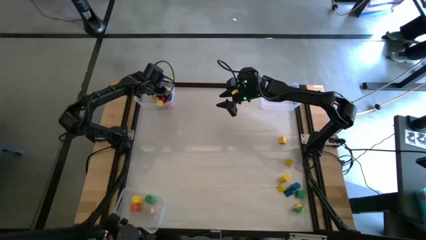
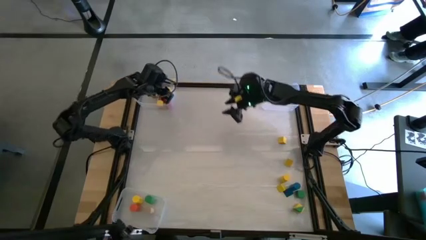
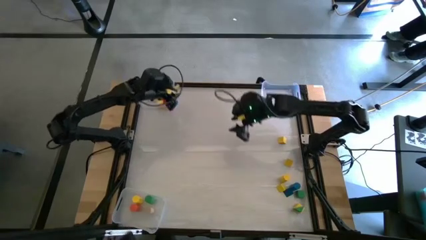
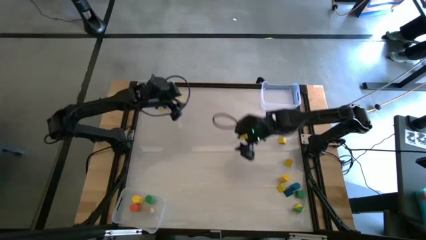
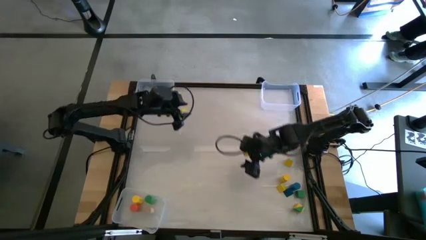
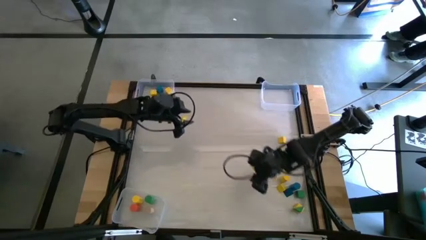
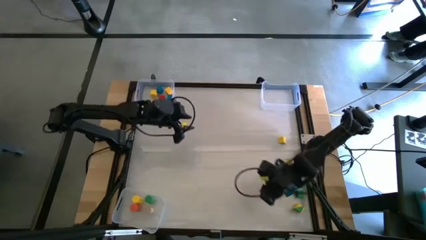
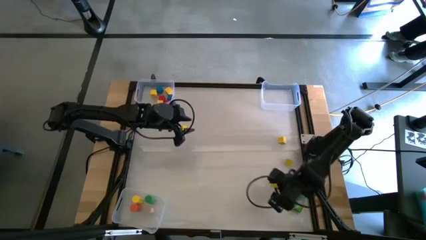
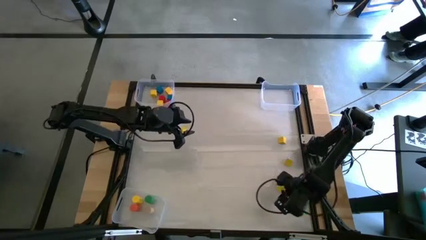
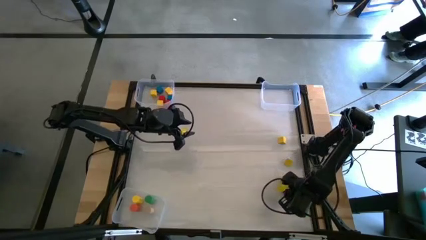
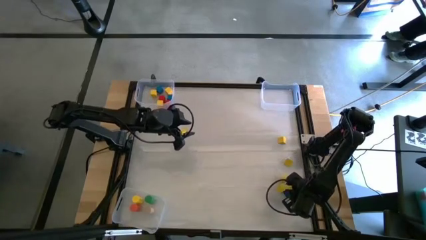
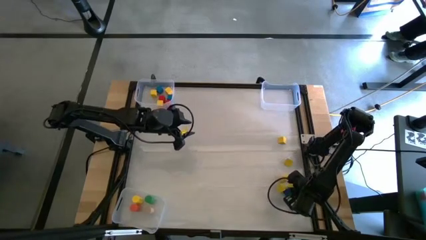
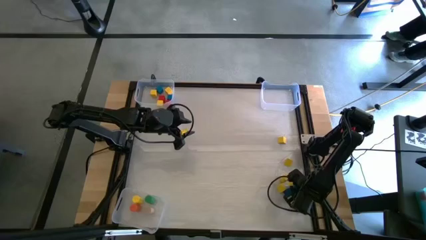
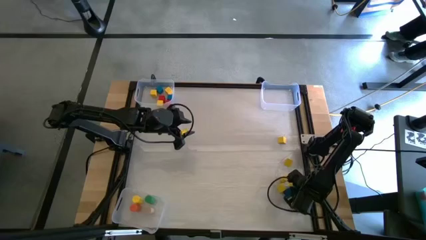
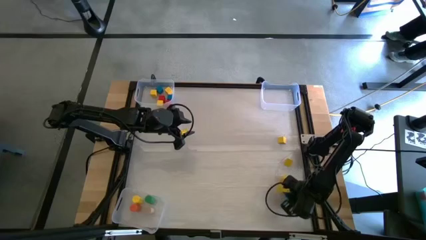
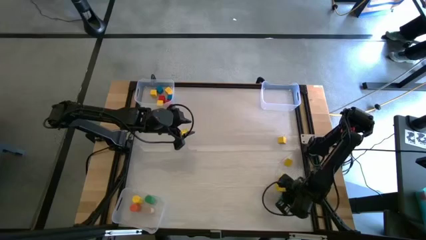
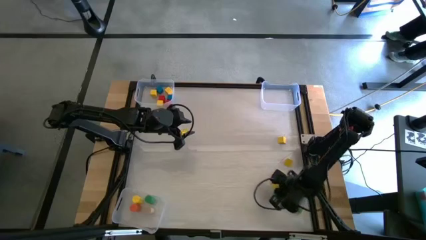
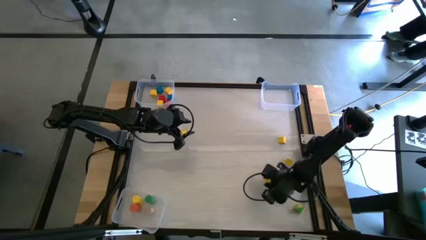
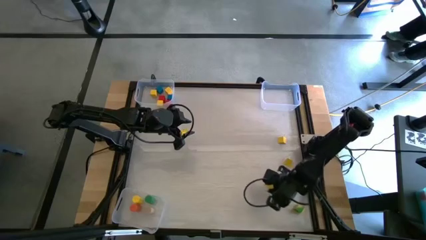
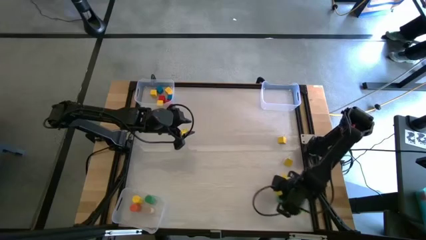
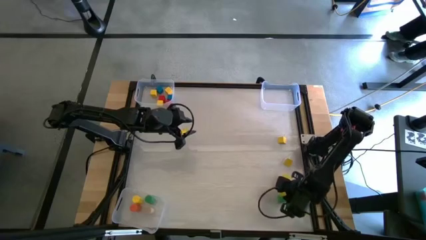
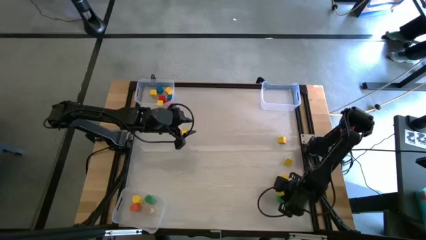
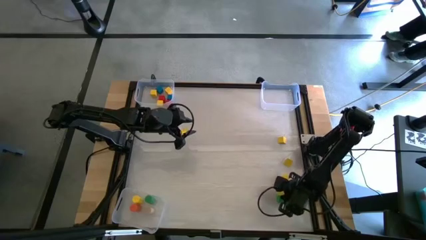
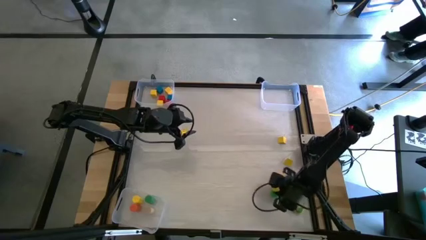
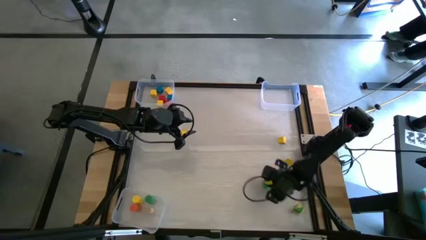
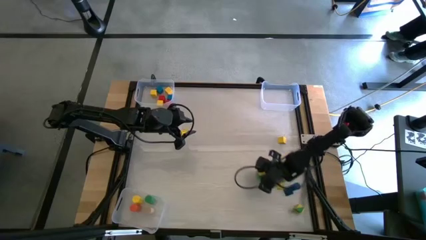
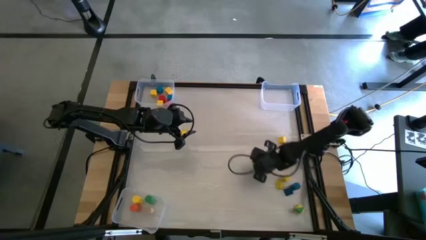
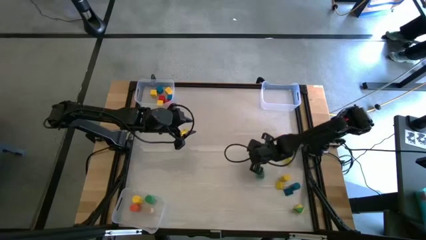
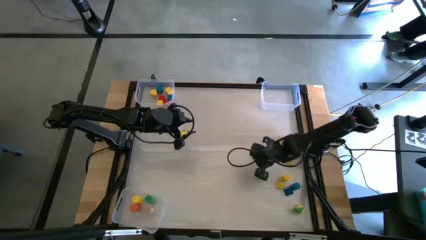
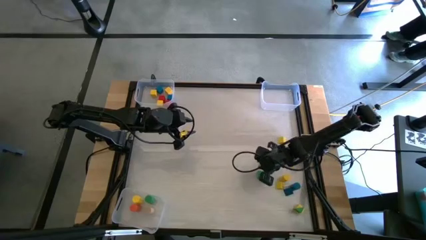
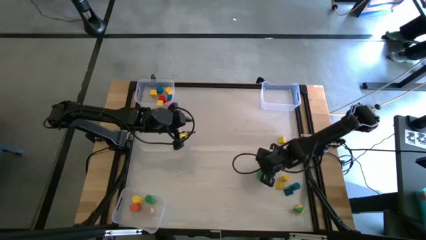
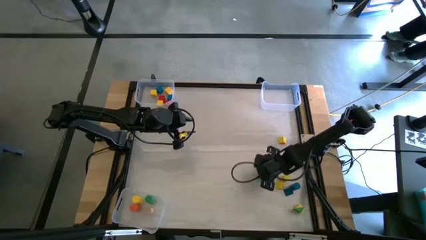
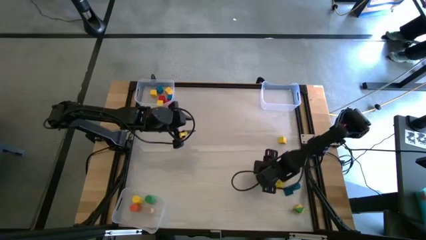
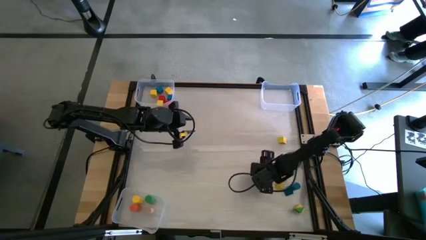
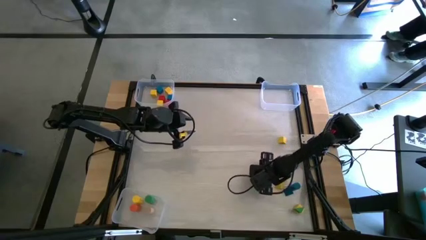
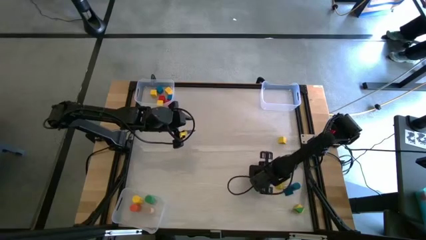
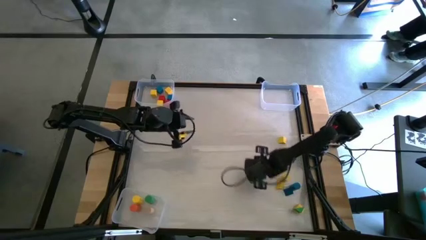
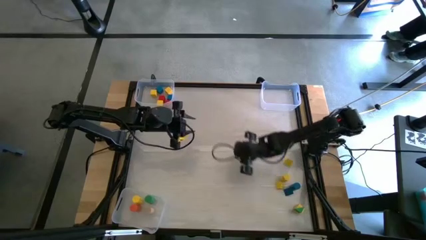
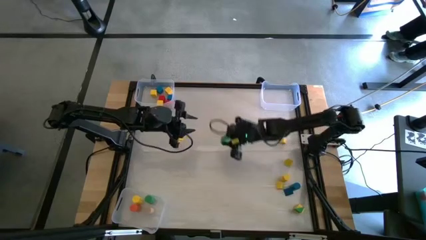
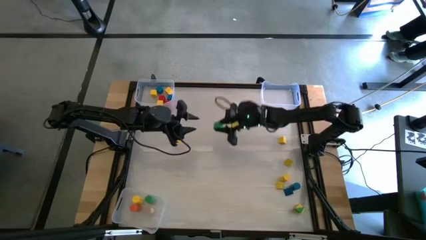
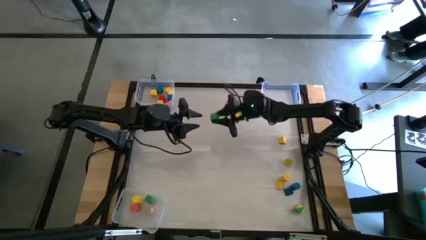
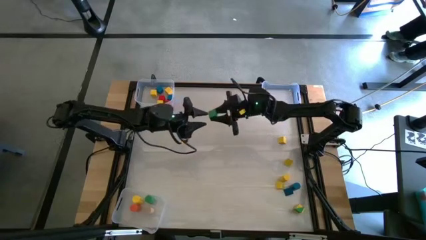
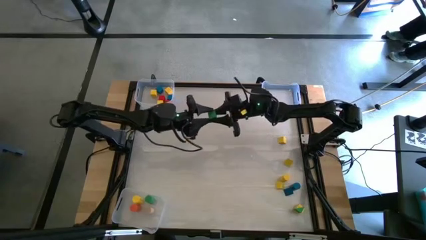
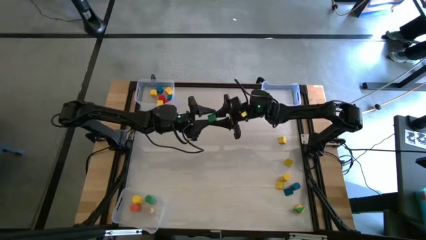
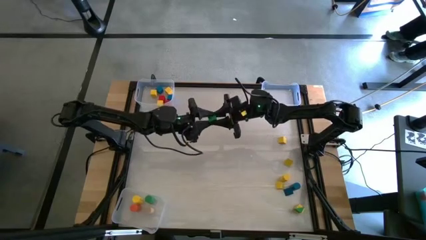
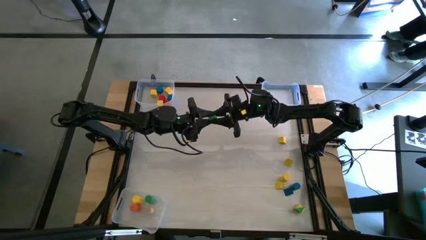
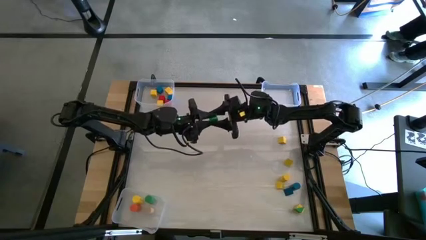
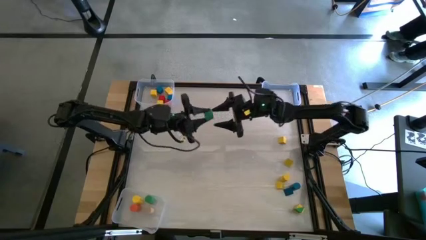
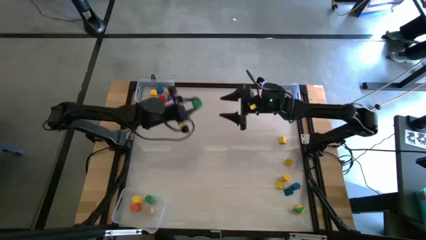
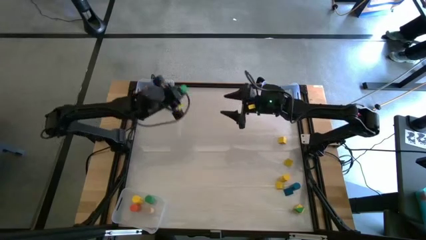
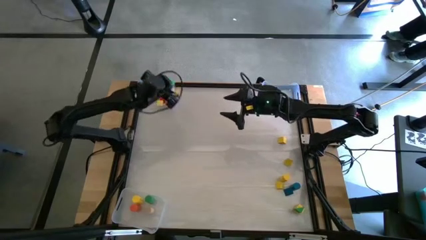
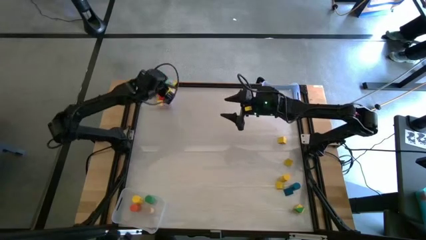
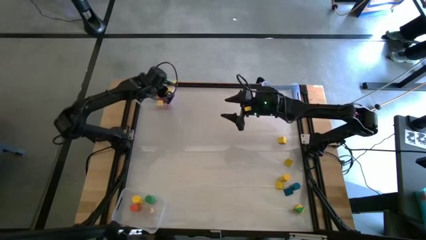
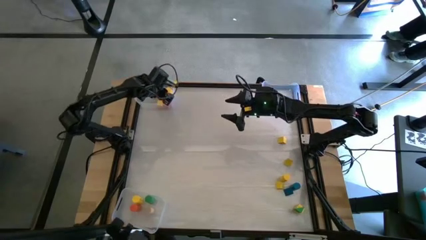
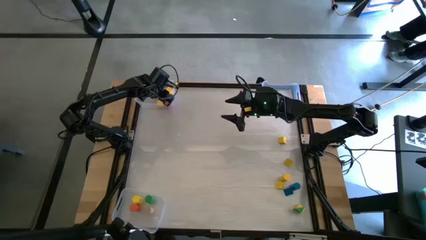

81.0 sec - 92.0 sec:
Task: Sort blocks by size
Put the right green cube block into the top left transparent bin

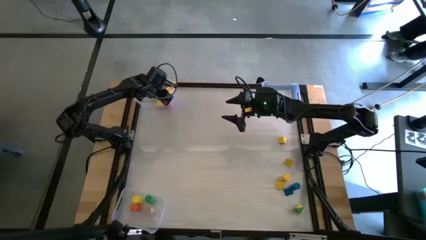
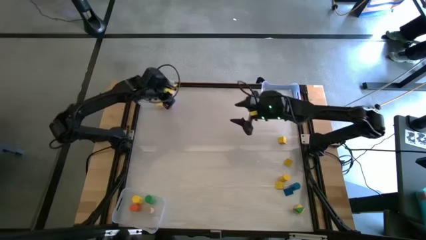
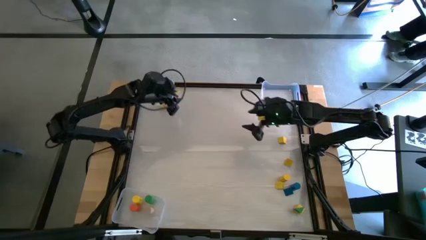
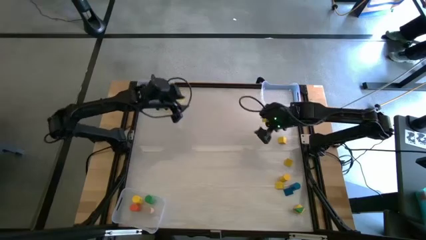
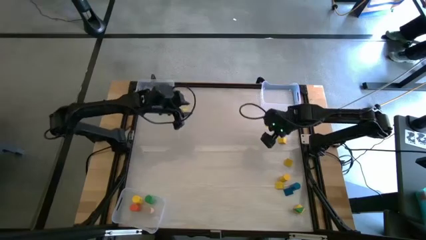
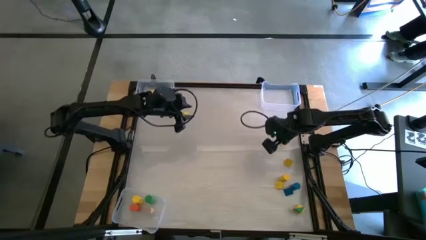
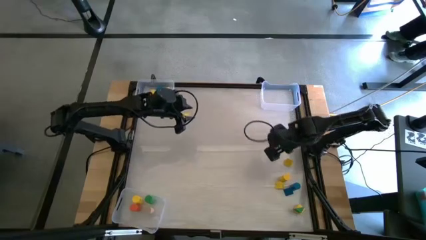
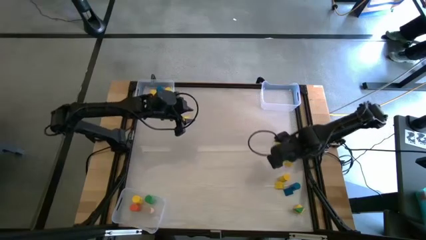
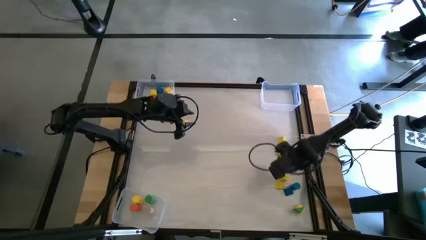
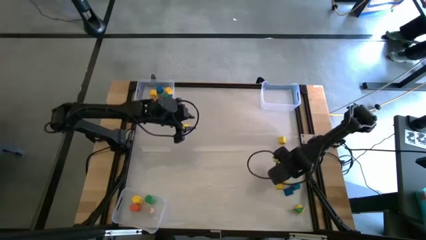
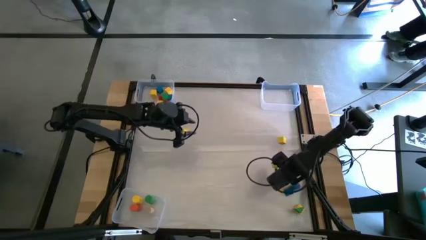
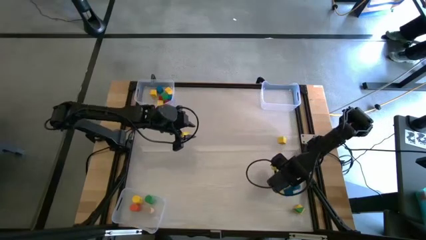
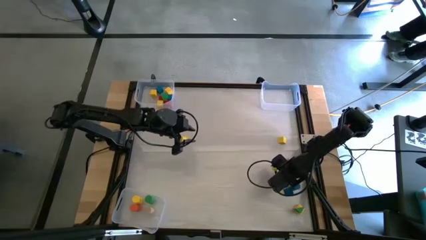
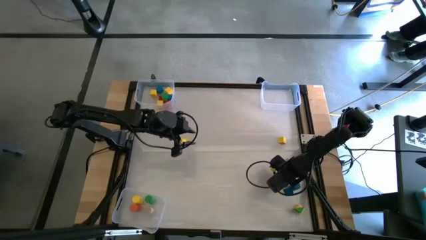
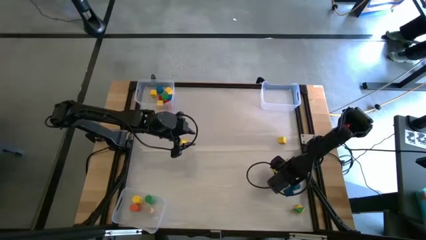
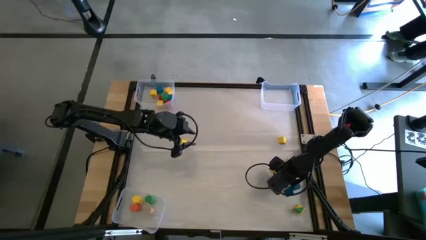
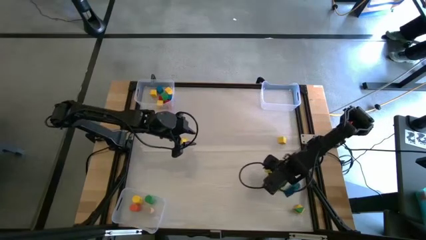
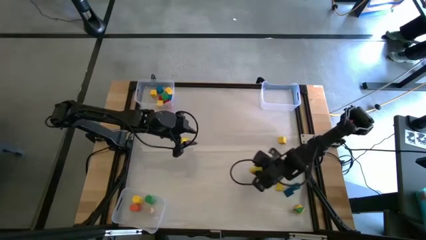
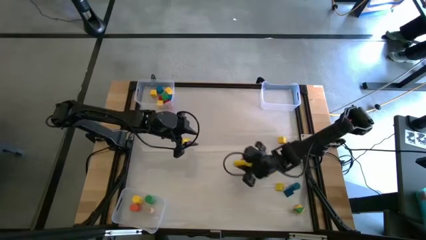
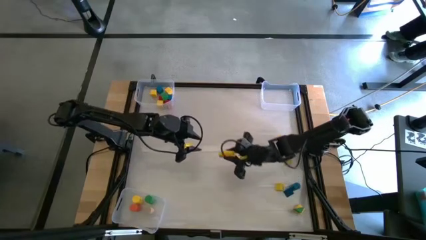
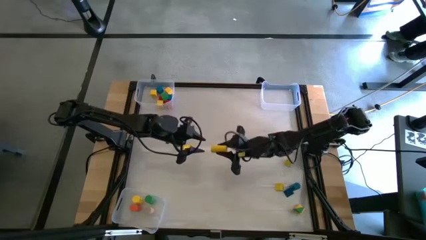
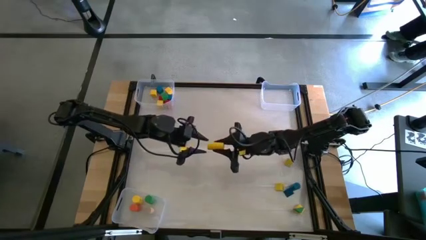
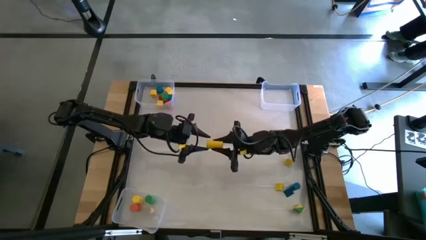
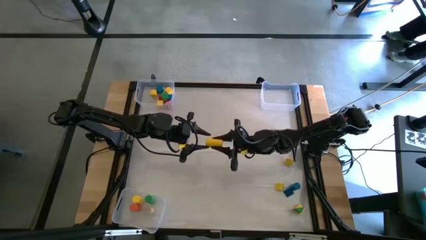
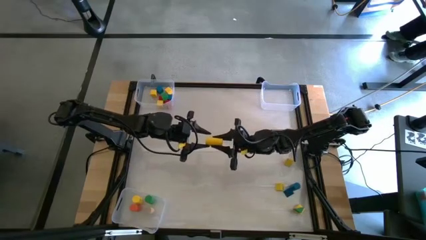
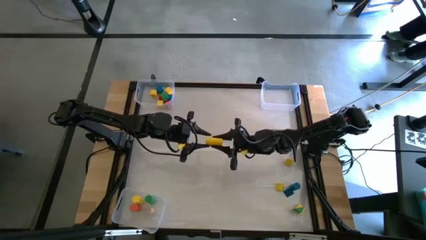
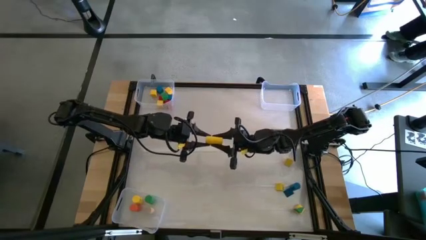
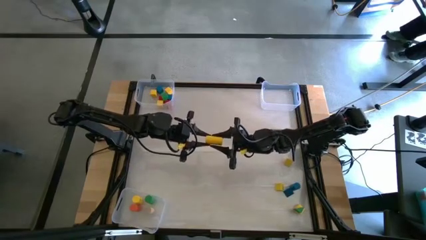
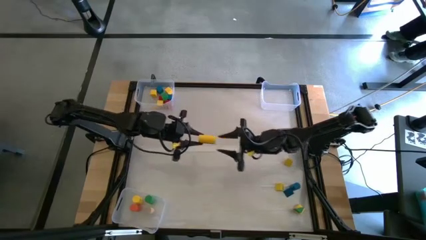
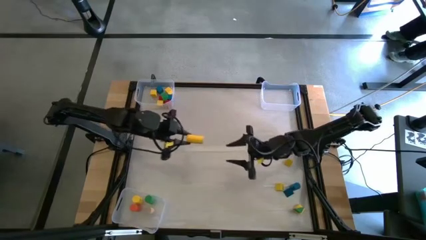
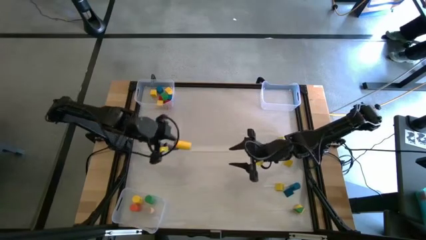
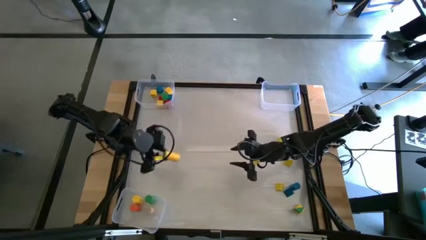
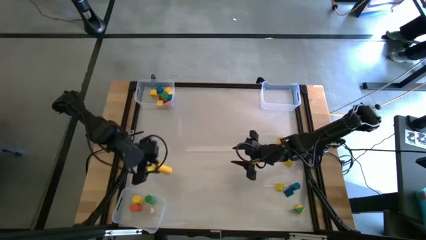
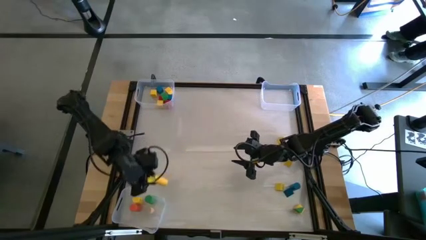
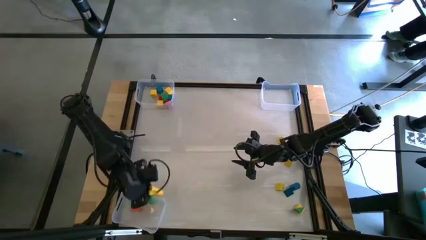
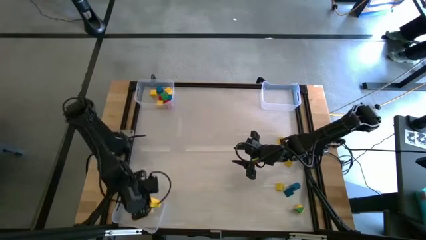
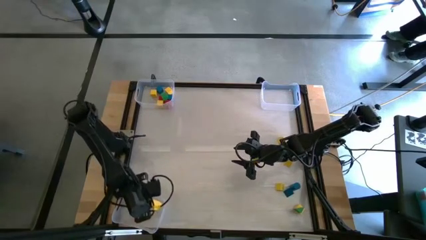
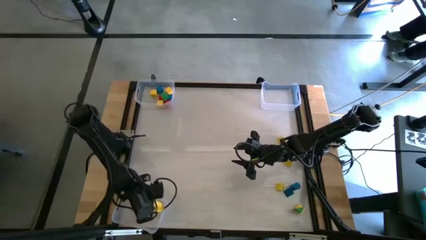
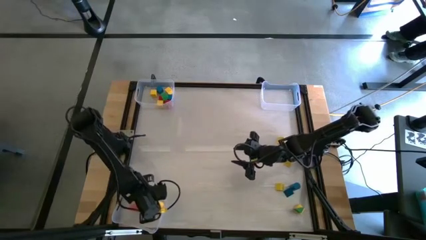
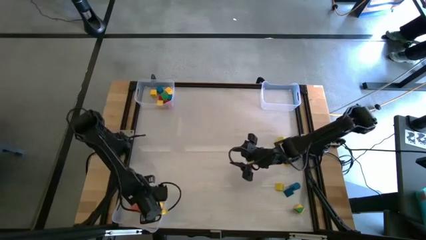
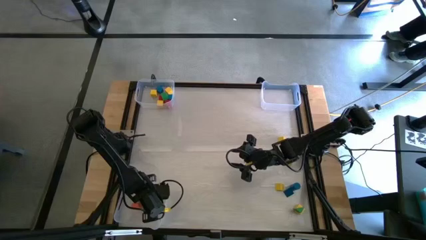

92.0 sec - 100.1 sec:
Put the right yellow cylinder block into the bottom transparent bin
